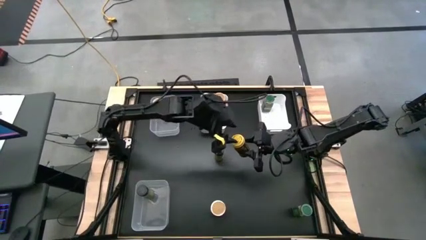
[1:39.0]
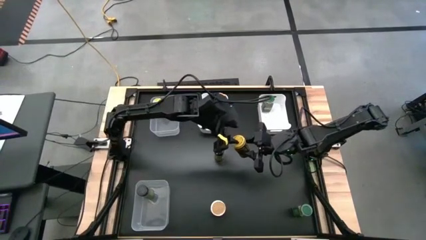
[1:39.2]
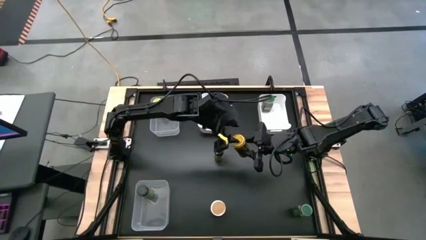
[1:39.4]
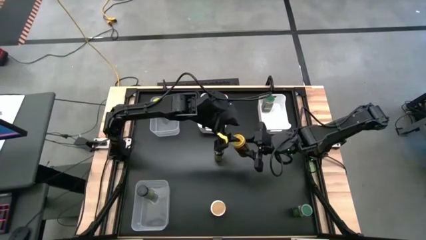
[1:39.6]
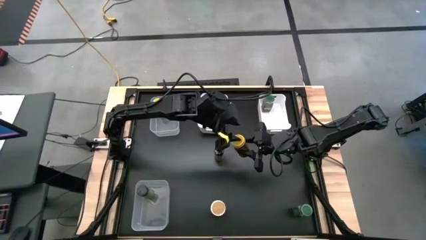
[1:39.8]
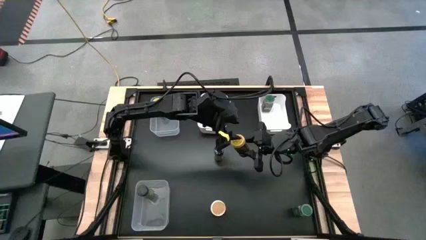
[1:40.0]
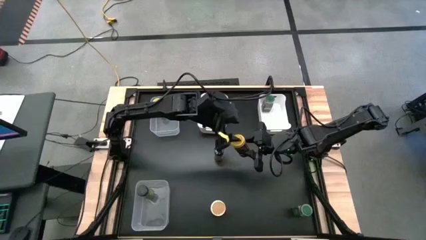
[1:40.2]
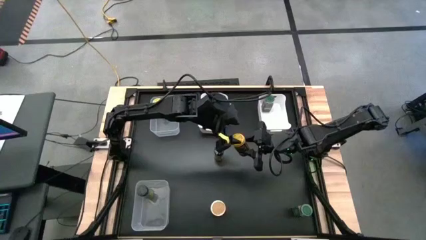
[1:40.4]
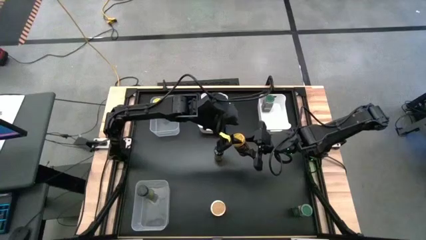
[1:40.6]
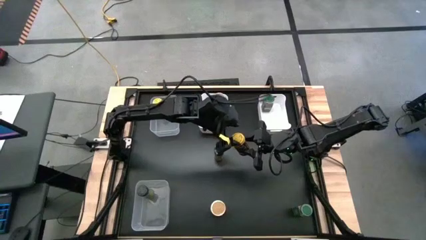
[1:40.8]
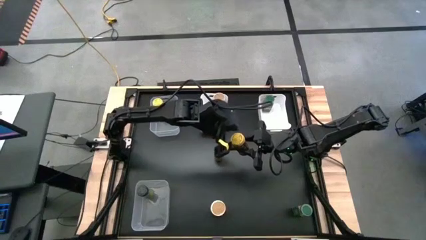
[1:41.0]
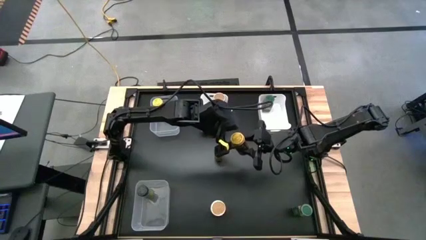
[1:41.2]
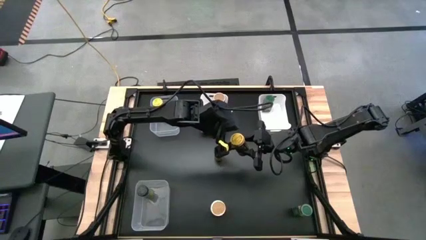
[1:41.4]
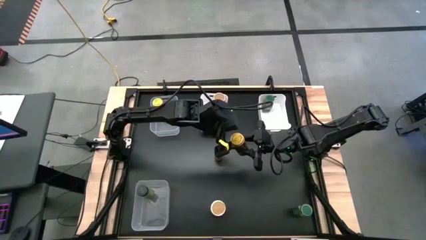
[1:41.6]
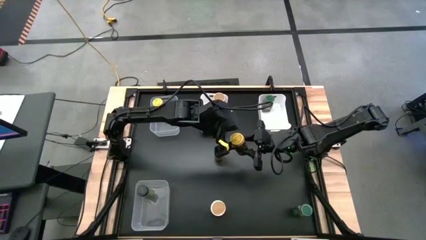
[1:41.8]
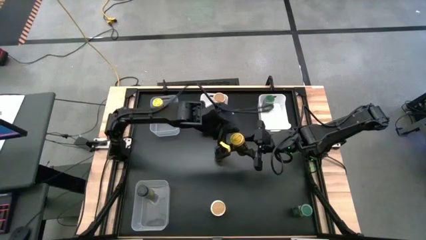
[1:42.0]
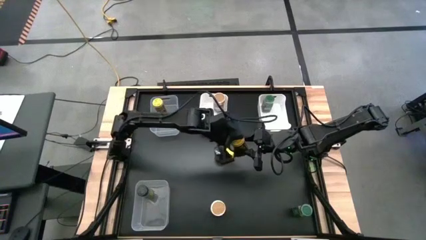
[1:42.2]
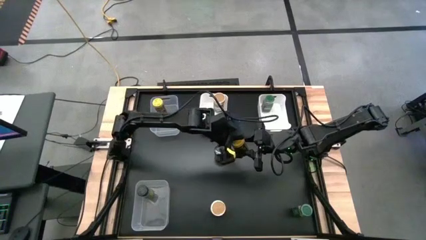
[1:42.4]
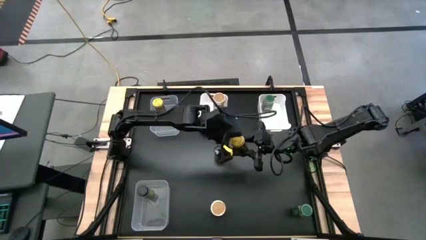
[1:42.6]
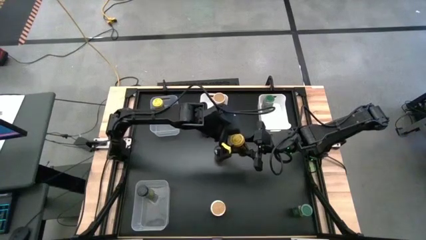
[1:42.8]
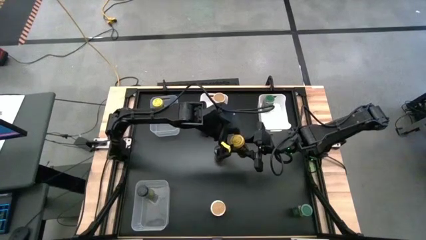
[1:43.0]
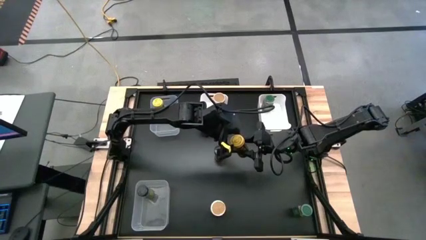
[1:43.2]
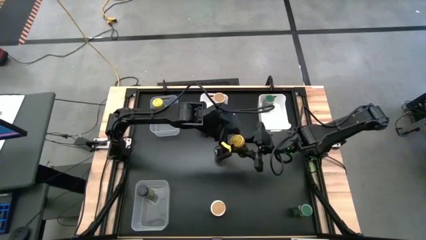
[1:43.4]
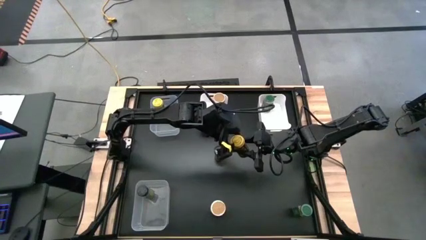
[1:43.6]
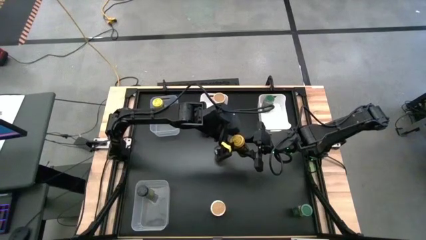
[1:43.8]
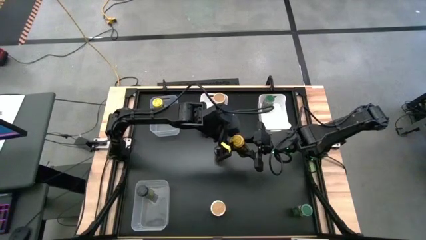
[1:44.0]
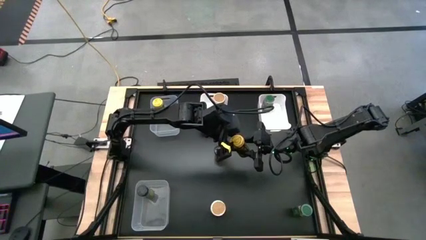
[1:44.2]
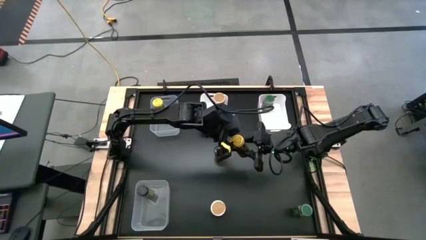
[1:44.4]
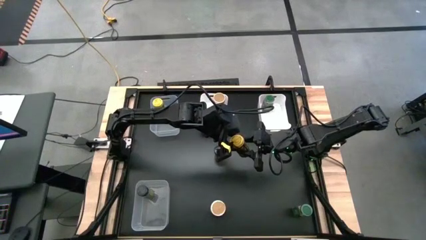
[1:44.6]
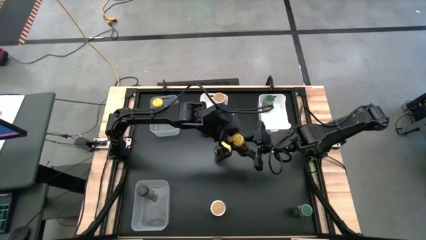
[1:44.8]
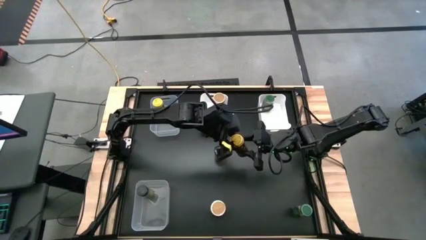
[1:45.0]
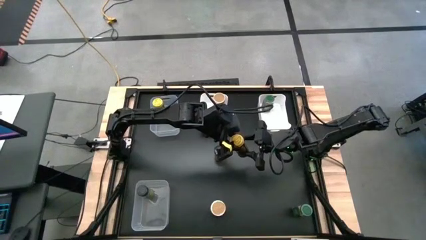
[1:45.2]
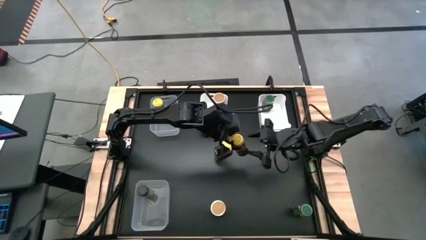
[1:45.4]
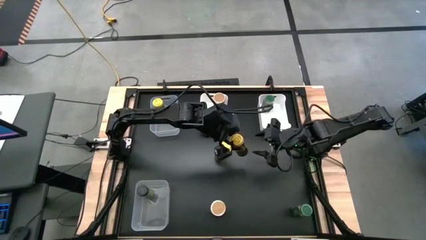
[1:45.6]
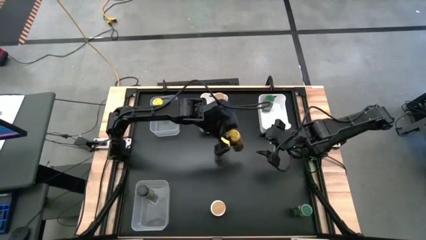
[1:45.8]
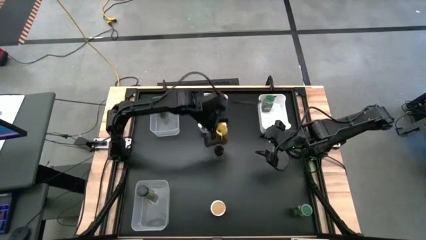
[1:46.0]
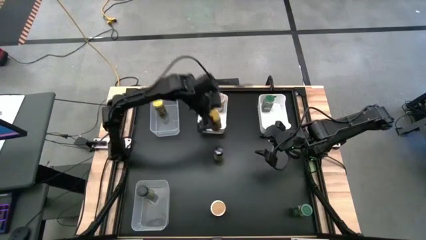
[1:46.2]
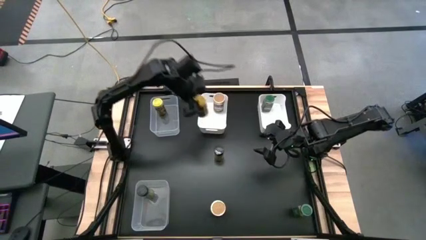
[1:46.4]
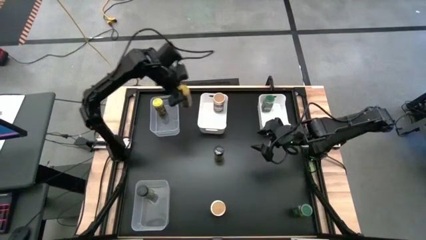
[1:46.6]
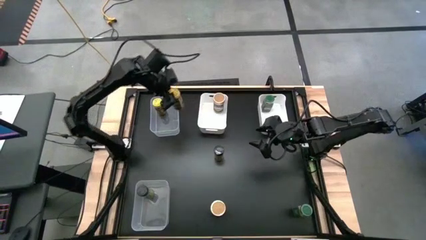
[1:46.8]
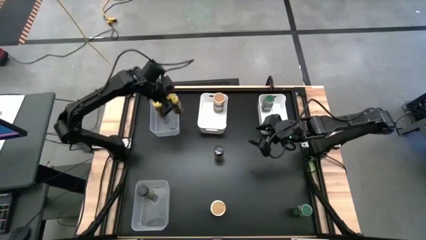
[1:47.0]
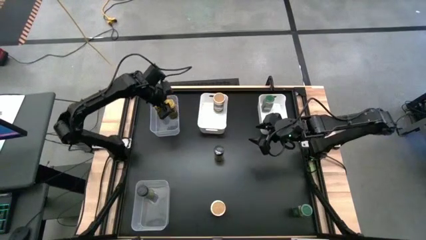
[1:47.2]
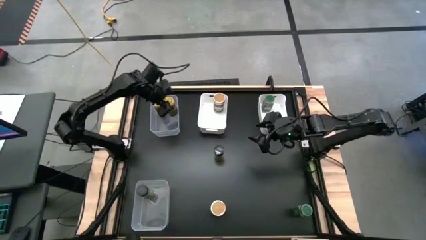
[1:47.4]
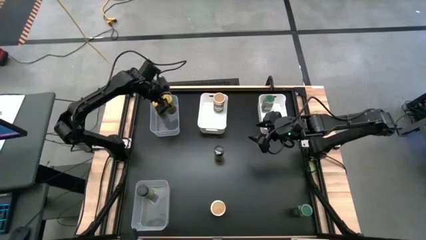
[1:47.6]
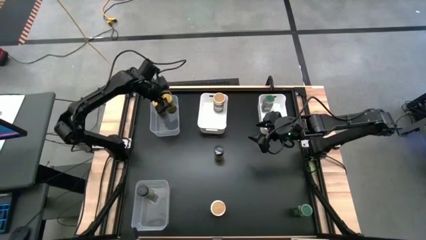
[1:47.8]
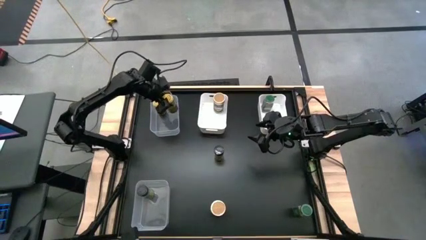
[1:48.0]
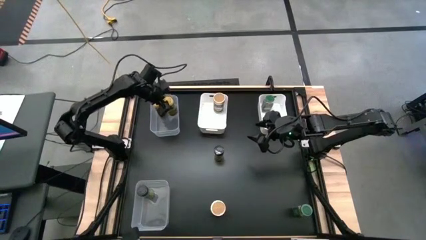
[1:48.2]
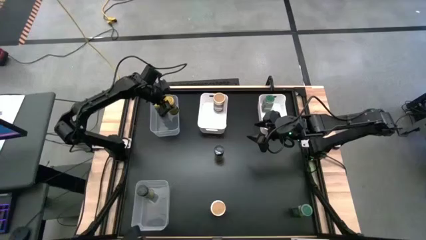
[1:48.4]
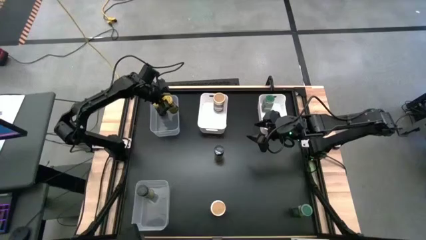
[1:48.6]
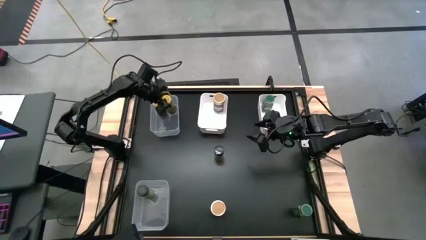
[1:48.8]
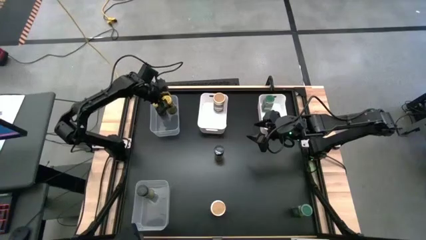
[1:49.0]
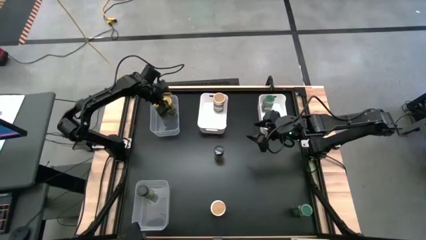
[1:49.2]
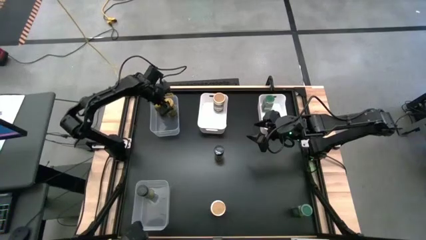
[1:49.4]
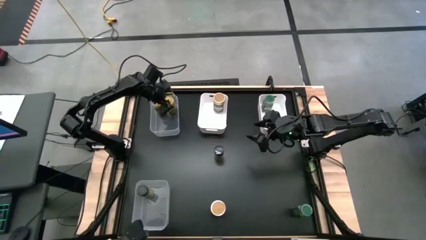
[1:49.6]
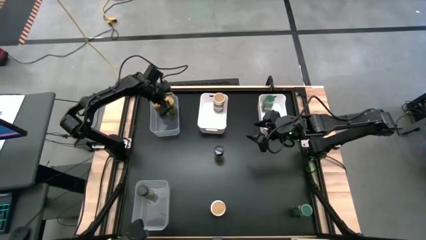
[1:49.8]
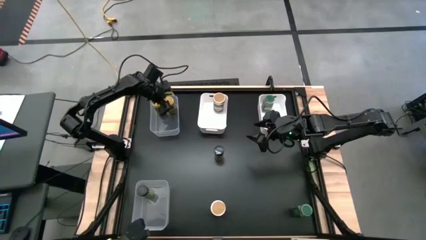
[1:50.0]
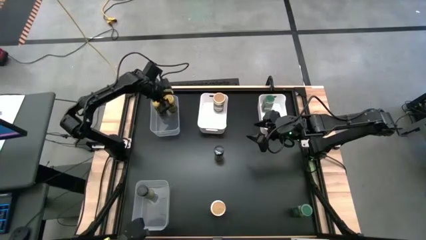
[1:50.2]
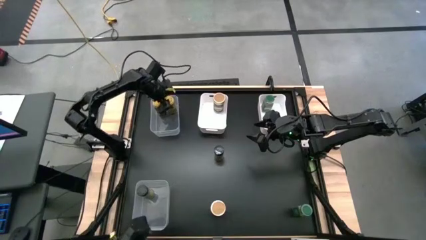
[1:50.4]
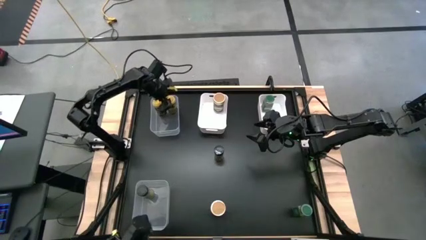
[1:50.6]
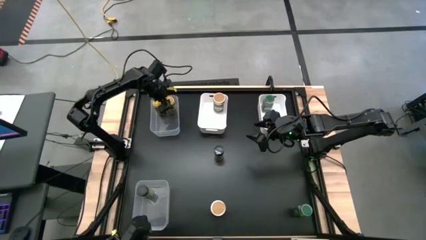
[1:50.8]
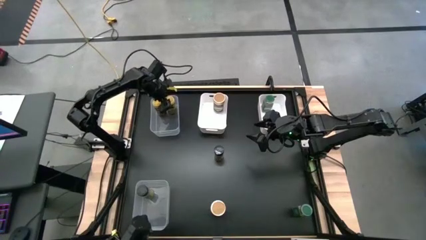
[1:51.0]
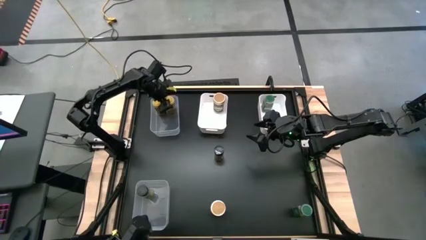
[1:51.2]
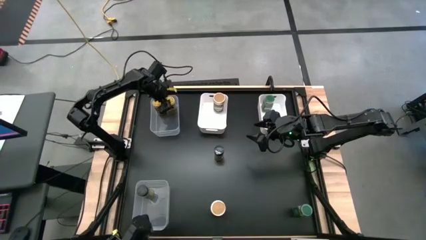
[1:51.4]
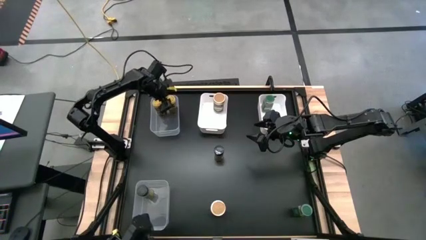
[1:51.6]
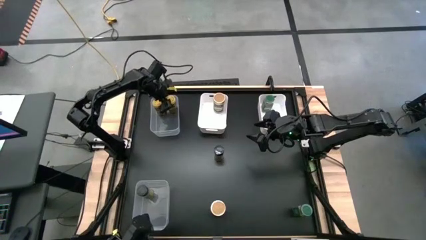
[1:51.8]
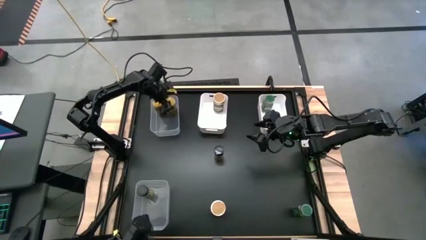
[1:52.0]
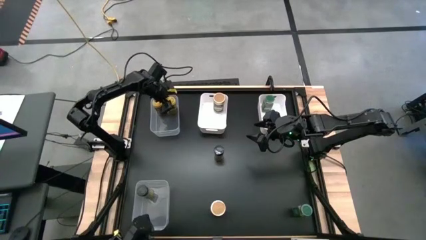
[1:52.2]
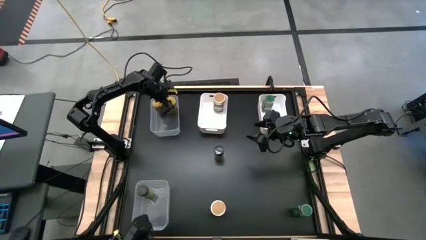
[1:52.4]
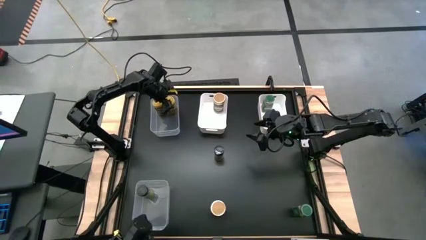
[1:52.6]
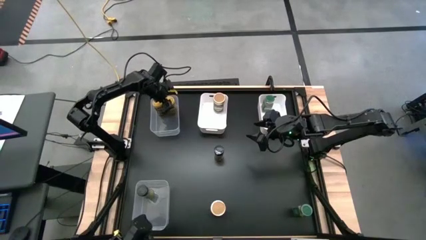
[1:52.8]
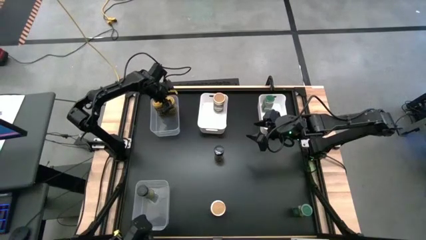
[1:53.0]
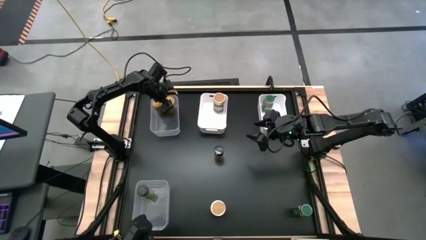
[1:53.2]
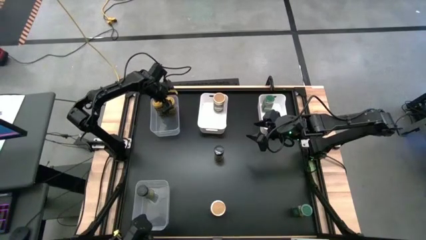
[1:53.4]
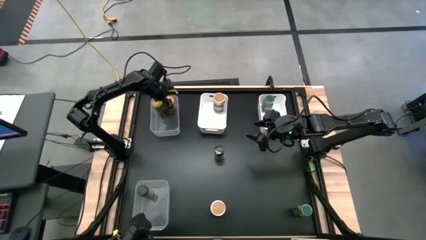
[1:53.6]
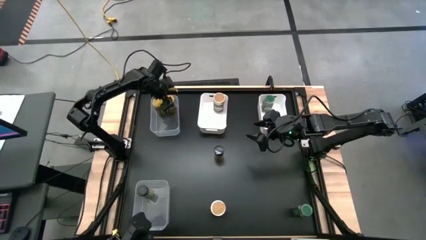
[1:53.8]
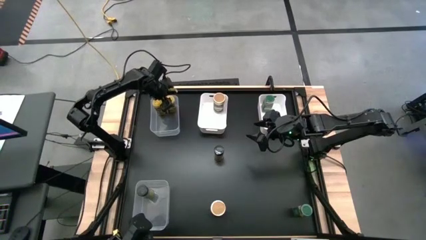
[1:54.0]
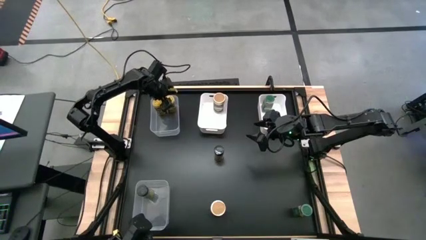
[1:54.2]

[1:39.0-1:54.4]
Task: Sort spices by type
Put the yellow spice bottle into the top transparent bin
